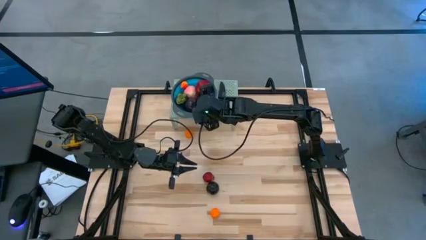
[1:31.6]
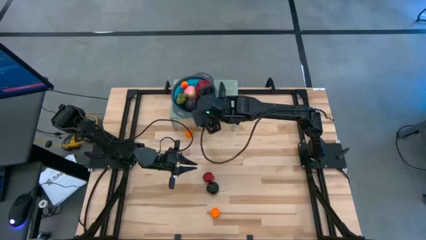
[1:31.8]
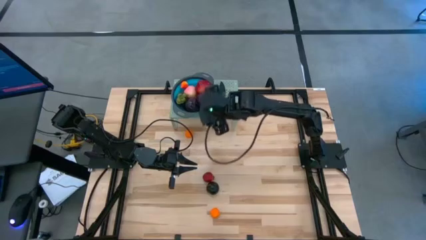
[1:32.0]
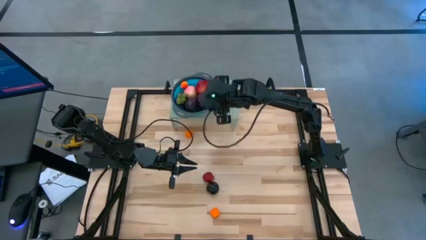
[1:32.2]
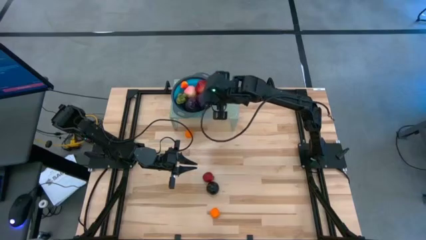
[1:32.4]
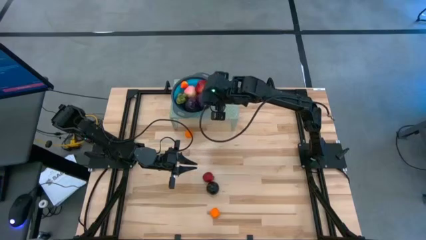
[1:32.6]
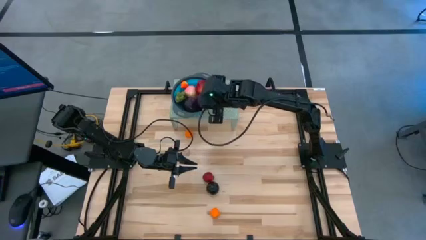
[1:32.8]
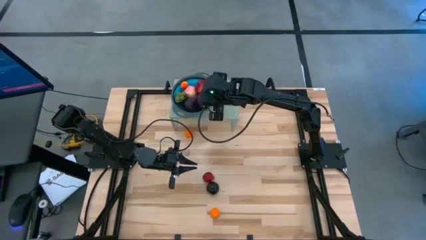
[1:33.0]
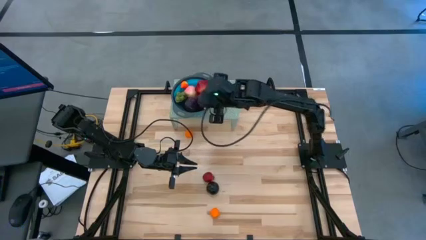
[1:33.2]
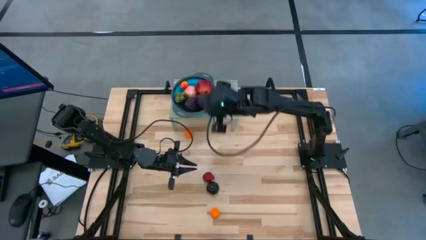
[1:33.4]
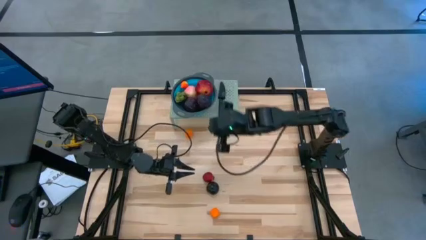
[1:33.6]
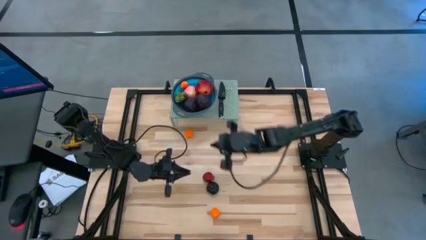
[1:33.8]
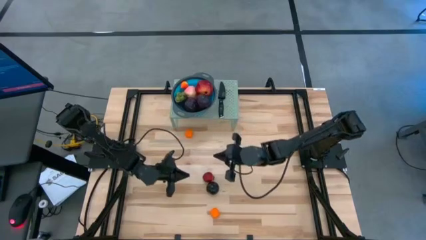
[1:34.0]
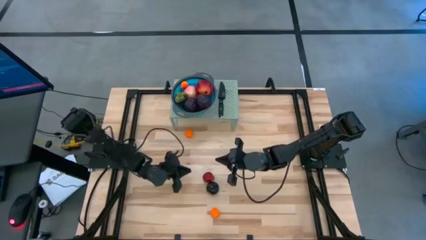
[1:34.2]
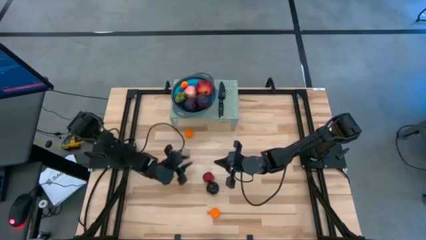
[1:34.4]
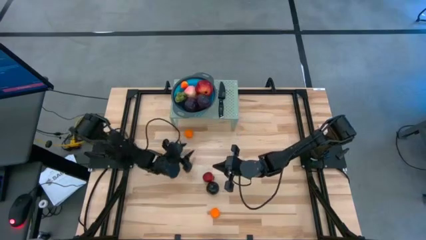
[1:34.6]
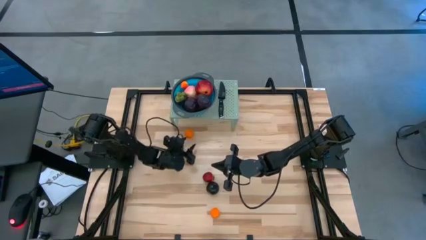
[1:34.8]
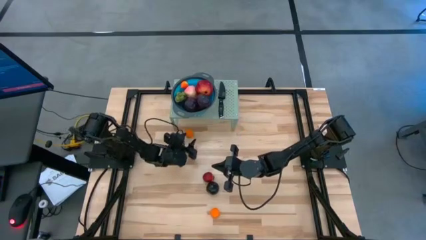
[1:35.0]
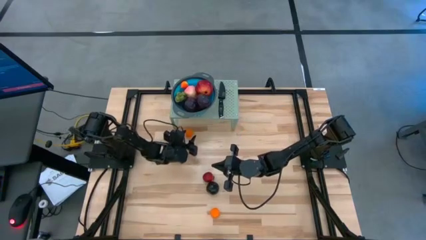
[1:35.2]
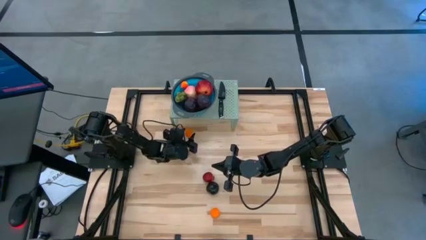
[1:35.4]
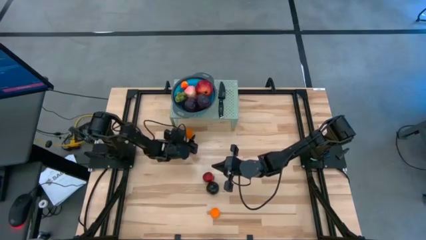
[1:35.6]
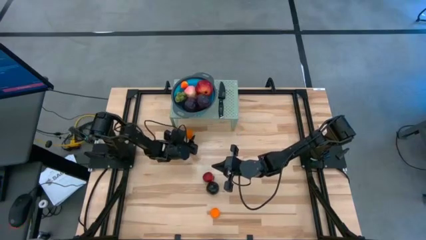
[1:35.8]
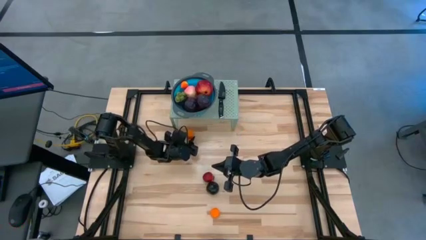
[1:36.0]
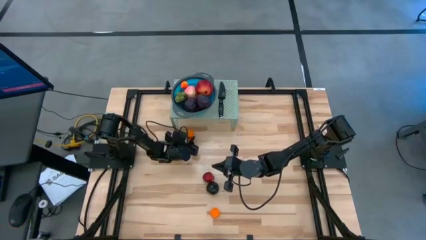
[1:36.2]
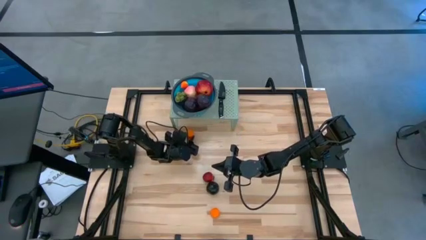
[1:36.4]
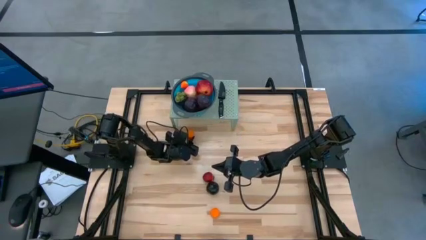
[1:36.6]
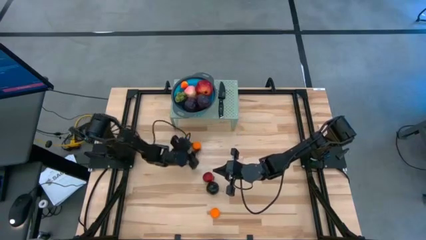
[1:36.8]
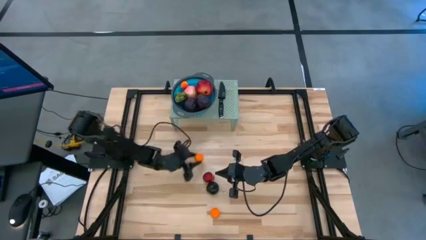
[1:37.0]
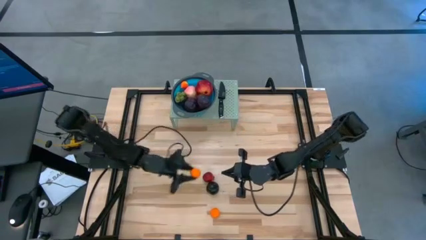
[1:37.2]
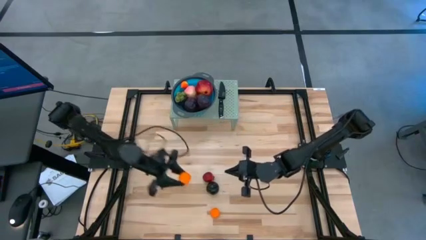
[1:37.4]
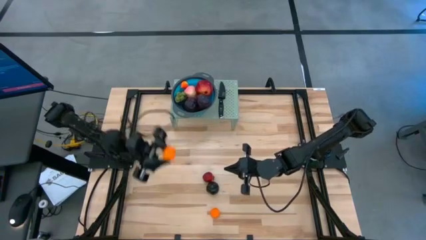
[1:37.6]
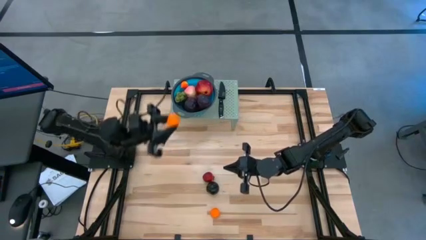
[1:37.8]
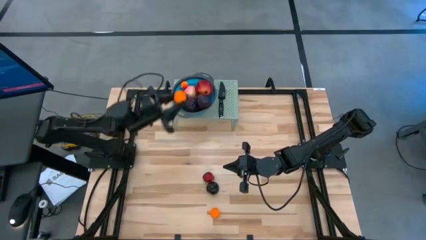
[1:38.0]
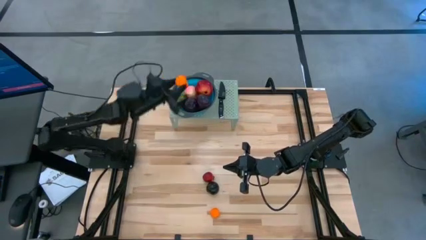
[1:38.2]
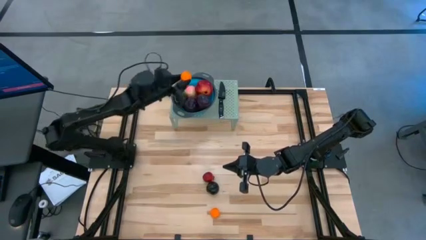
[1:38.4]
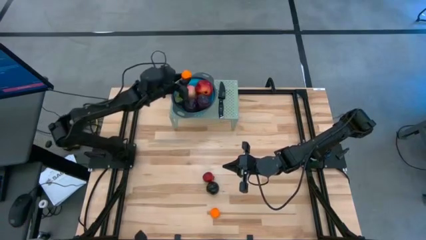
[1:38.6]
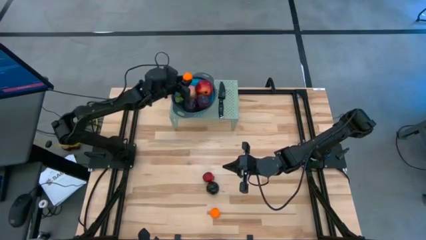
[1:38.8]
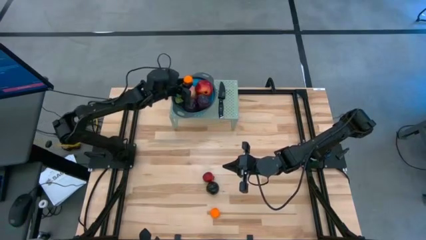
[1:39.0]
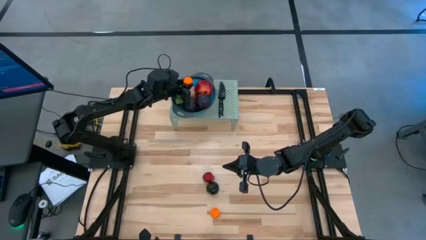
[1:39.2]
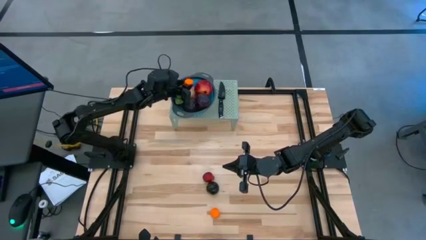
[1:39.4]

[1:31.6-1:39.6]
Task: Pick & Place Fruit
Put the orange into the blue strainer bowl

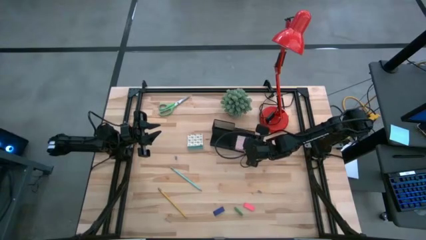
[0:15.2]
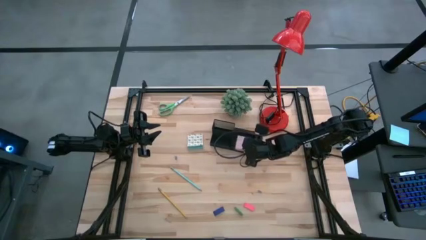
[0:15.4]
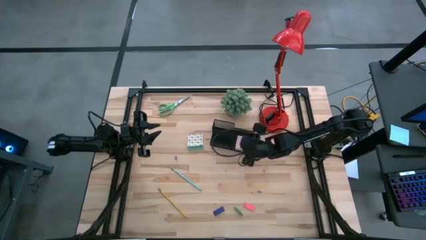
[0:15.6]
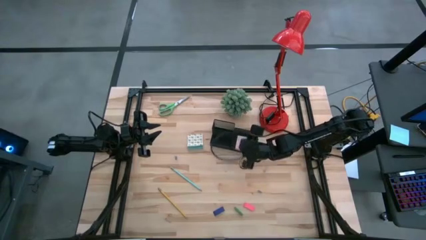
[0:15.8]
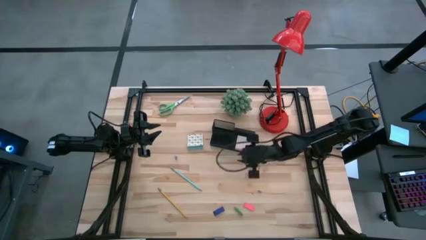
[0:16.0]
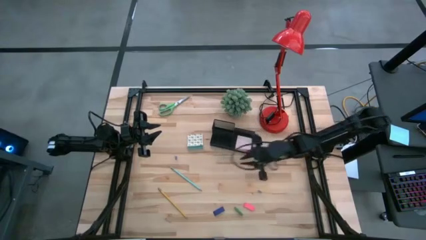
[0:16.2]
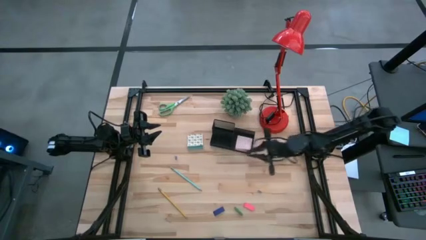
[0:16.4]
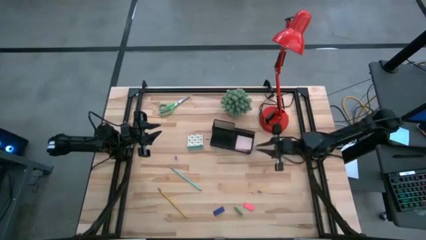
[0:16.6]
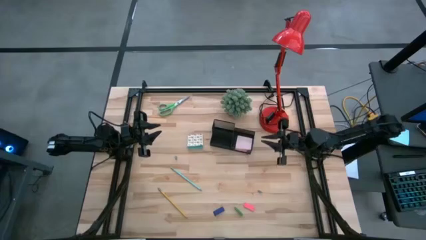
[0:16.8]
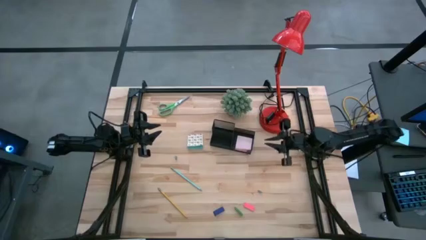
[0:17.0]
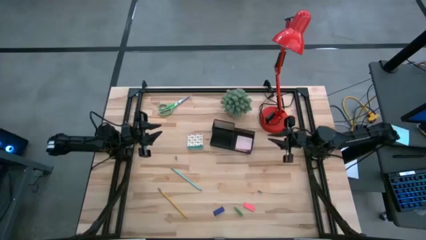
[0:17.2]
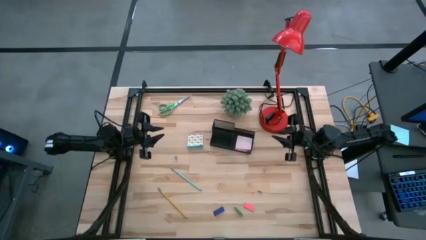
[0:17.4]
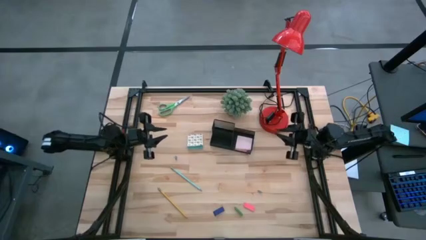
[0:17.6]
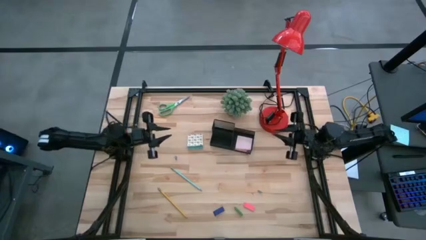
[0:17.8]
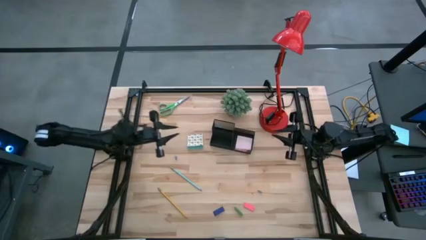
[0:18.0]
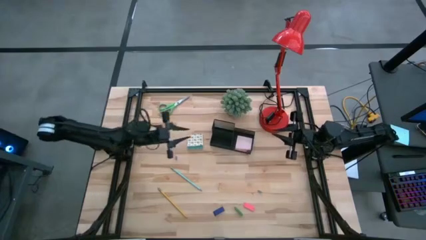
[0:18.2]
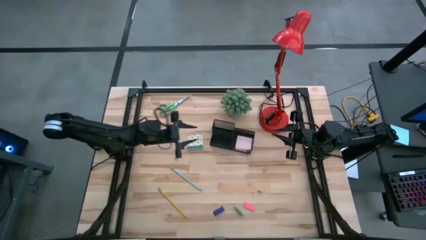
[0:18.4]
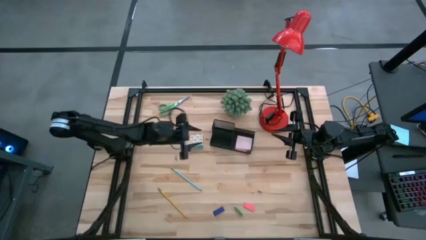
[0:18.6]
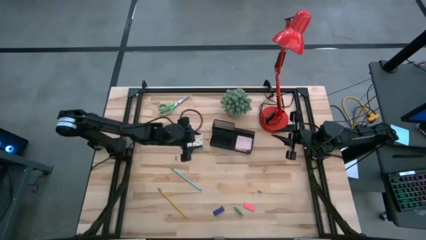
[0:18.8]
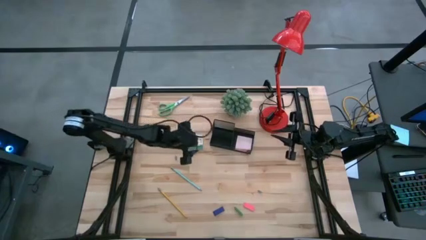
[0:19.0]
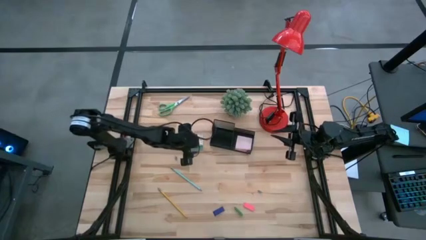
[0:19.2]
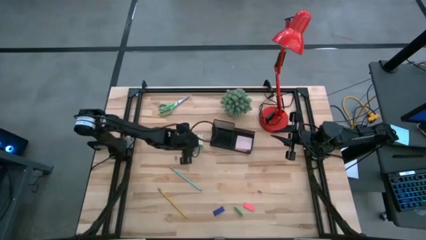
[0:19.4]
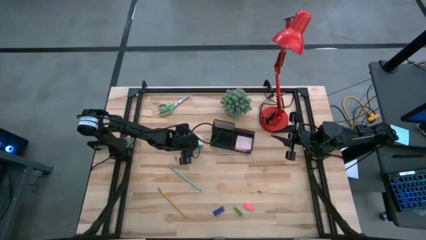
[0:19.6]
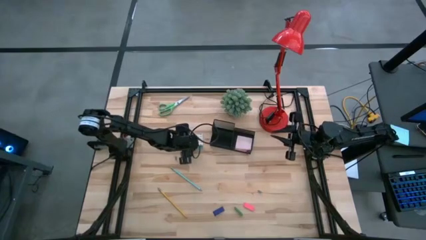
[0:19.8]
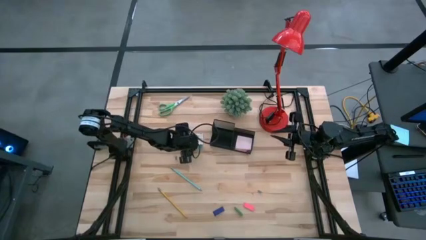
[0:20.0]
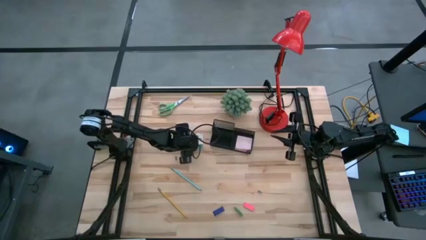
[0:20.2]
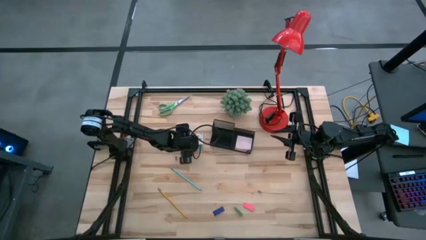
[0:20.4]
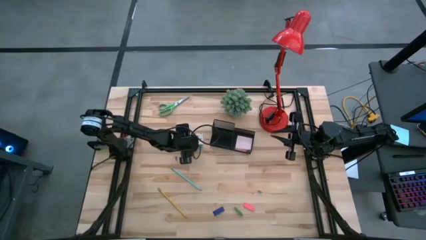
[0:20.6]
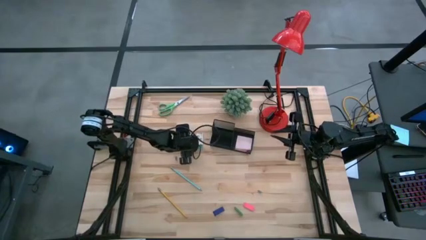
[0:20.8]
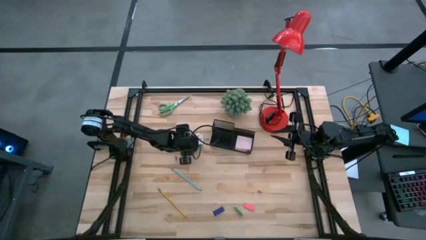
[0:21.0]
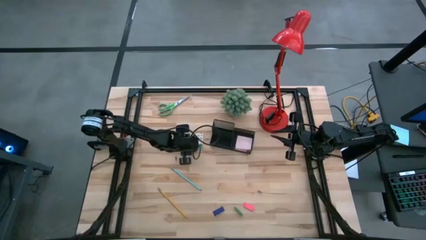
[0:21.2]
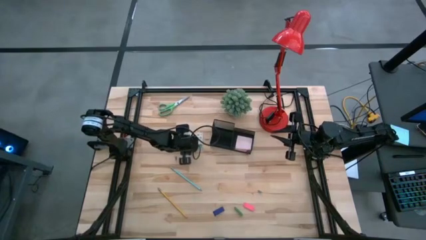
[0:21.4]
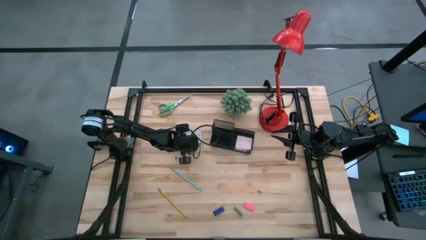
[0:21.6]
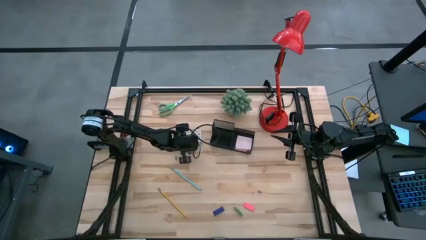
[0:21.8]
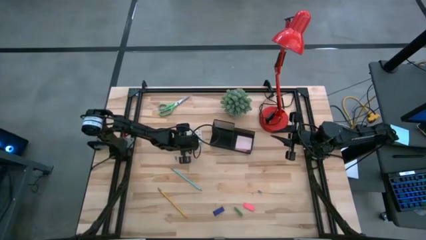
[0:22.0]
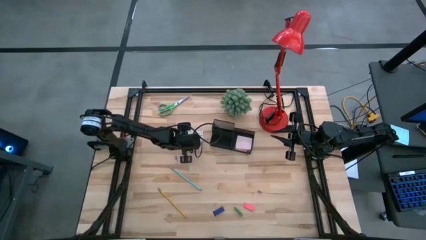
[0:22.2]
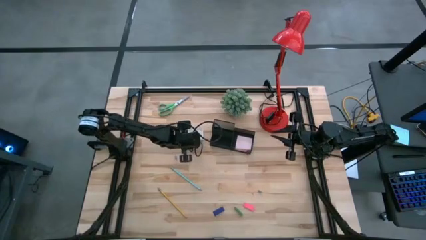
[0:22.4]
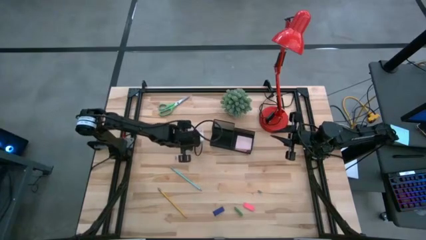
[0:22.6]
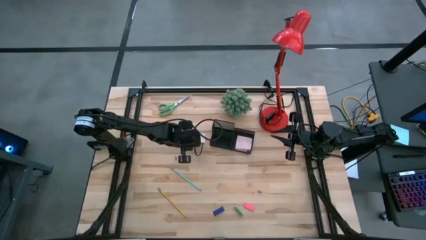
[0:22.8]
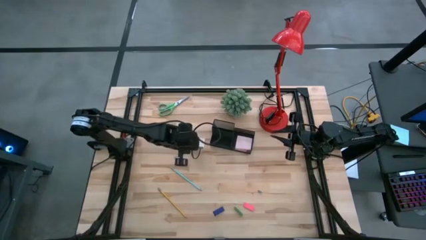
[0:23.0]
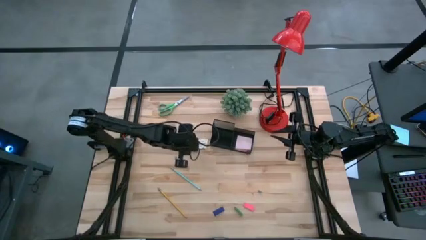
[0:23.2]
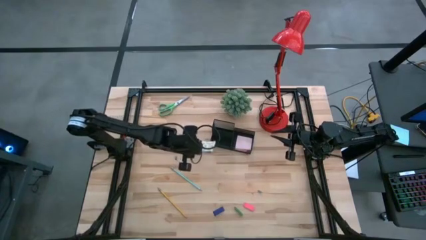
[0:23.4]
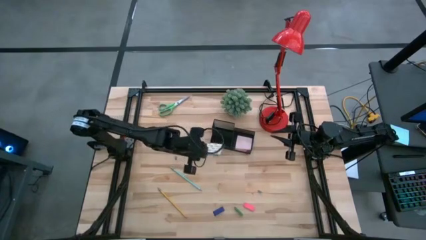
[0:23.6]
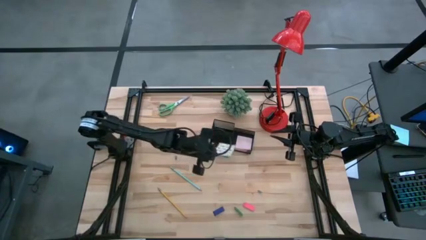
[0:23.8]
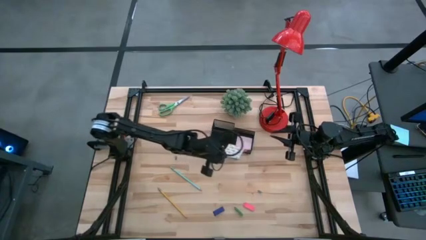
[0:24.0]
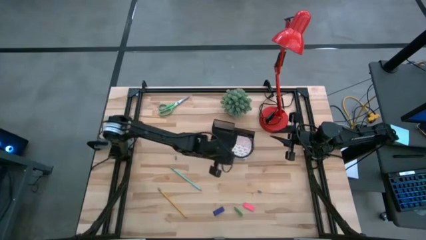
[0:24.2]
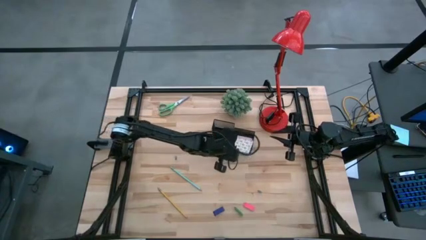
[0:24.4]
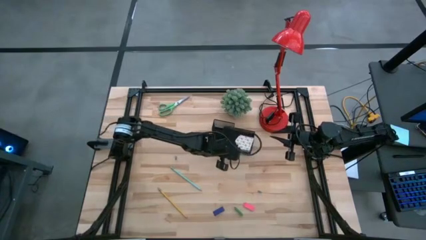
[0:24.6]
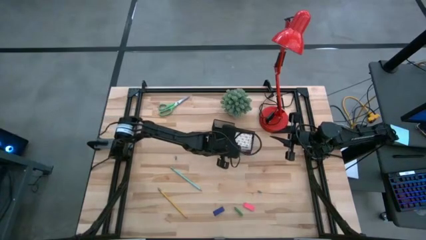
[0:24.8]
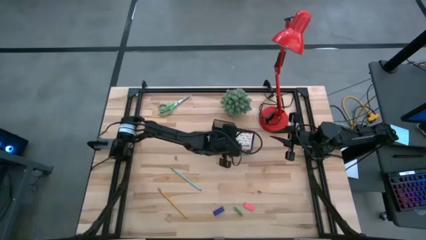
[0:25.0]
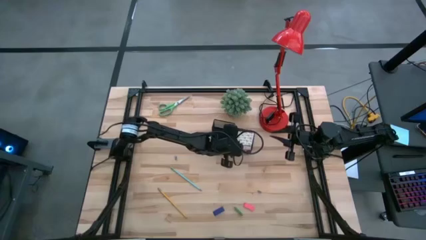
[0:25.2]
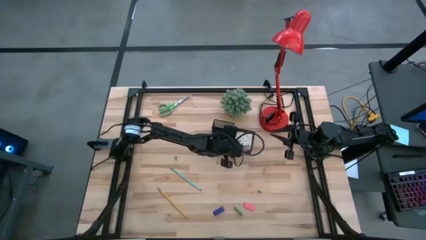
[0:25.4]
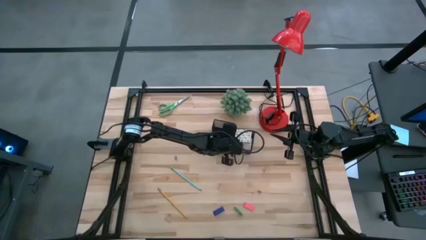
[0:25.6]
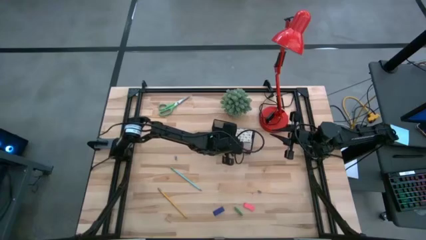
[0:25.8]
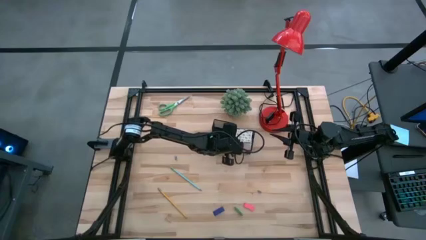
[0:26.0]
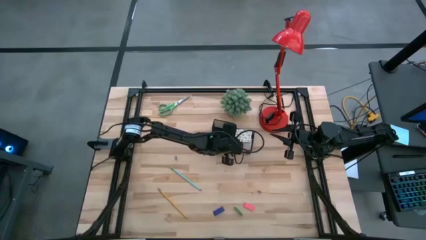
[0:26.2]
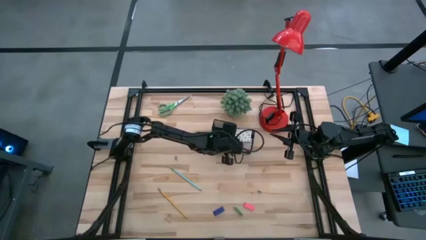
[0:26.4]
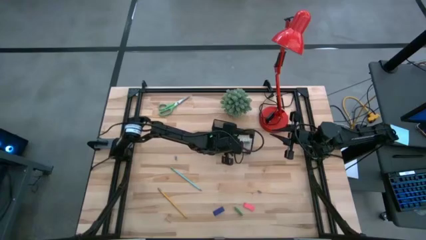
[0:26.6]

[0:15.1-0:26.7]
Task: Pick and place office supplies into organizer
Put the green sticky notes into the black desk organizer
